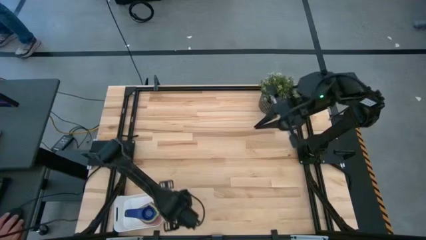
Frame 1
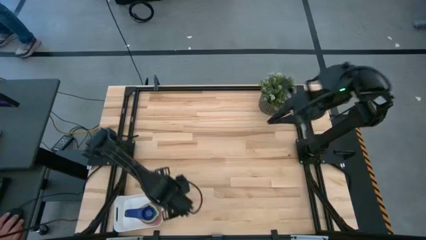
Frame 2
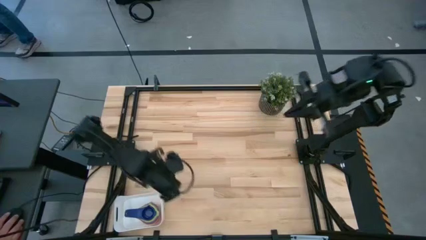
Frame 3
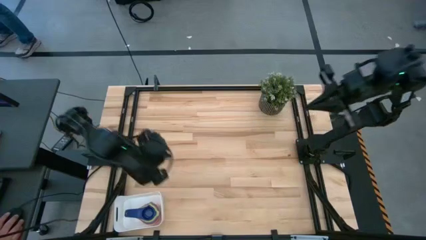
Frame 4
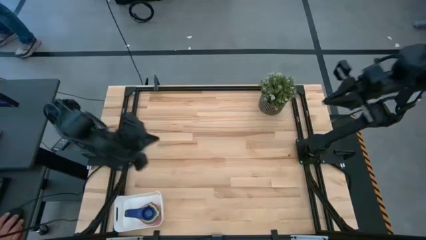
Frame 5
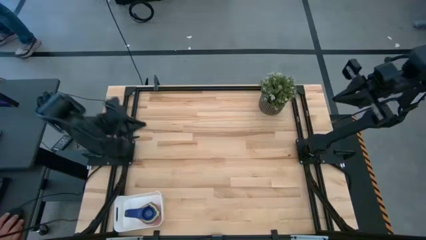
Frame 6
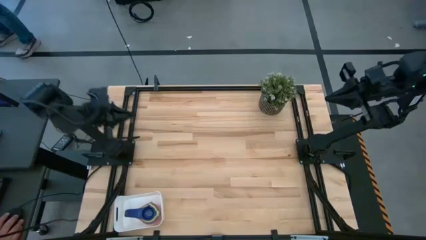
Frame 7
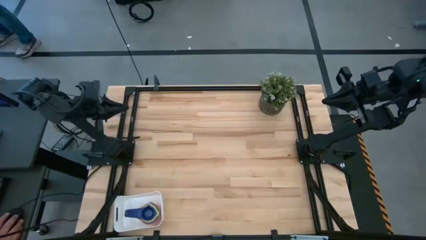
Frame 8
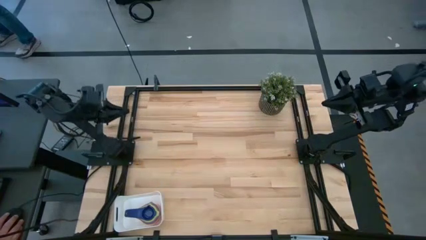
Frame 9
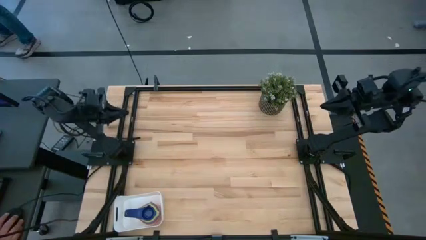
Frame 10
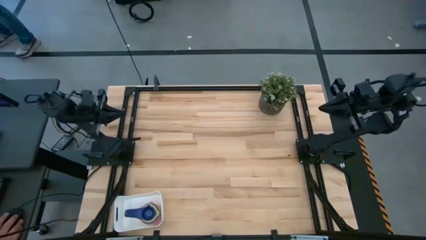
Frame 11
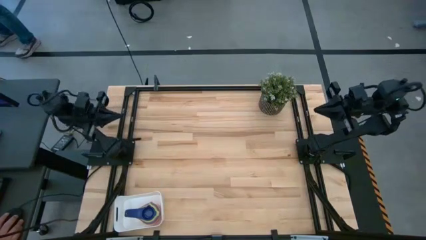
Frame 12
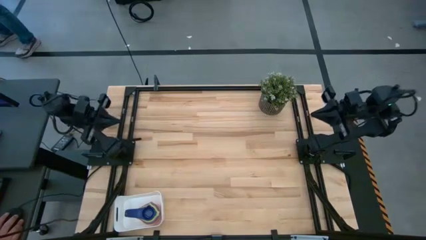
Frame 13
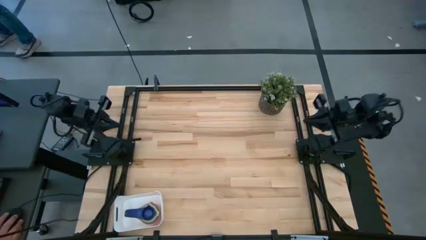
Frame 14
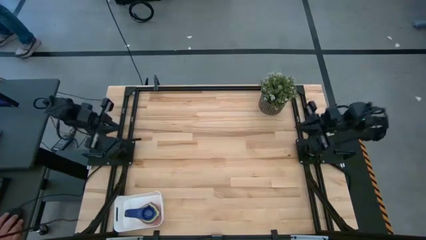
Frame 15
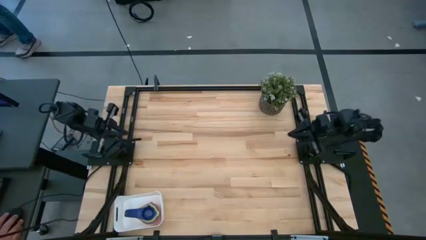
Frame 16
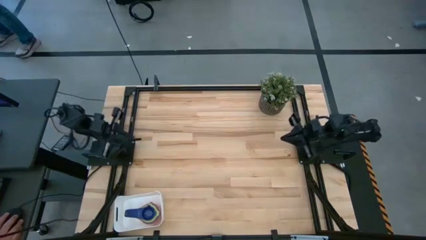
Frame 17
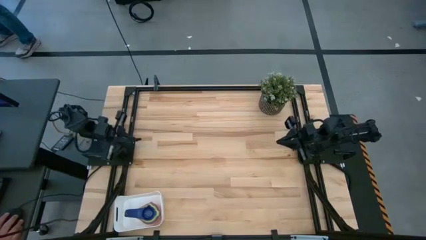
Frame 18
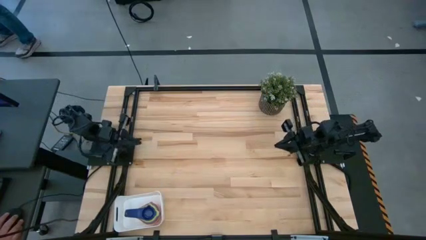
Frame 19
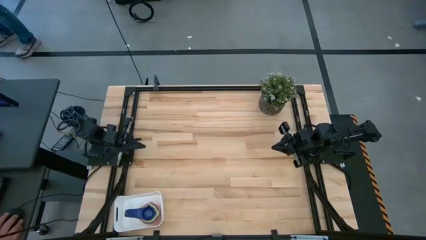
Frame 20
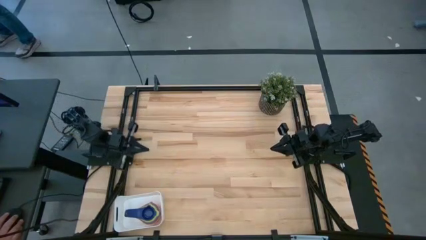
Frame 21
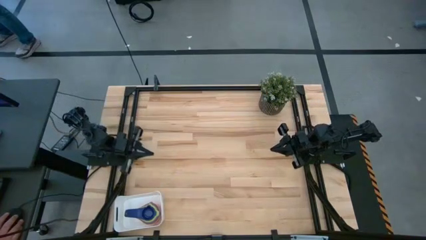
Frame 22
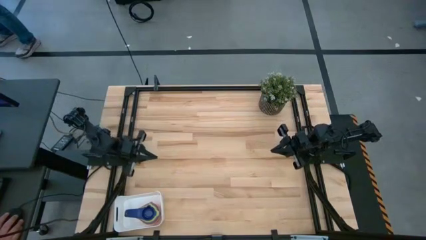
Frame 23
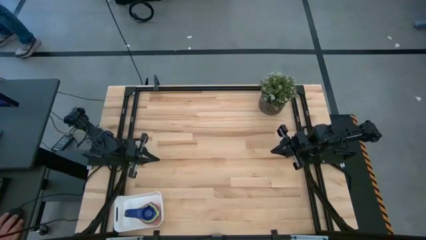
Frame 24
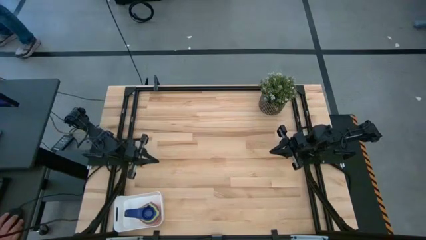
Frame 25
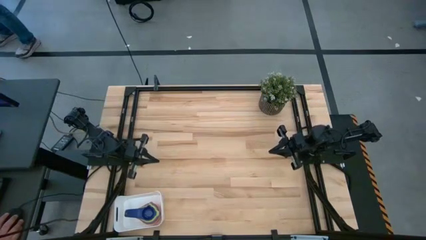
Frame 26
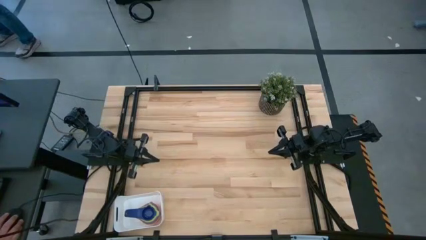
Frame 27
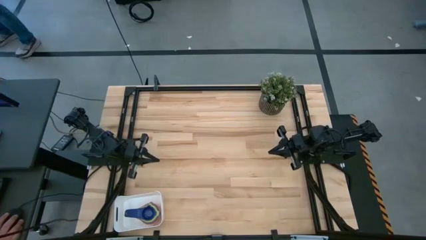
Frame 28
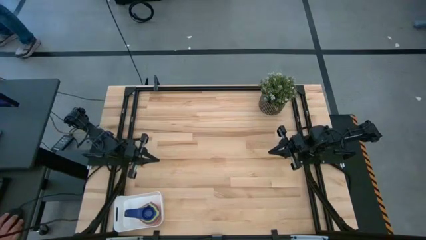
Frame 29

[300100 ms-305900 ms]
Task: Nest measuring cups in basket
Return to Home Position

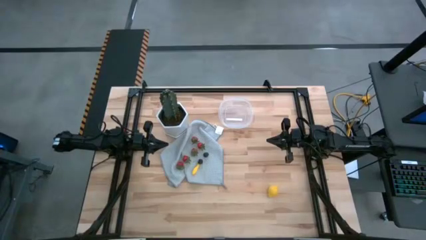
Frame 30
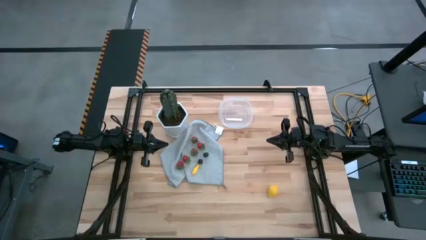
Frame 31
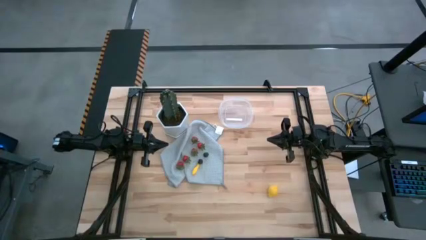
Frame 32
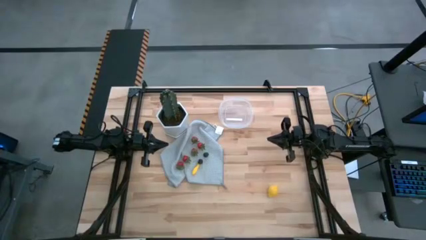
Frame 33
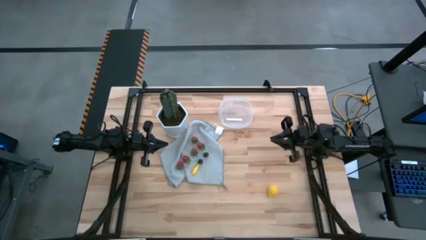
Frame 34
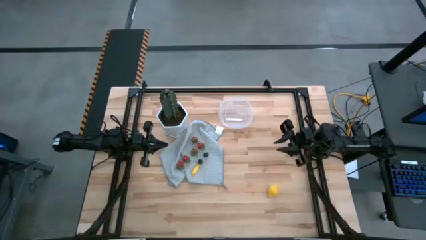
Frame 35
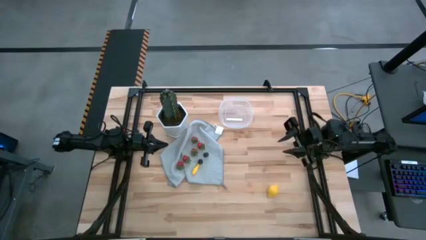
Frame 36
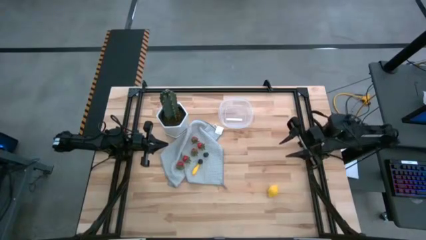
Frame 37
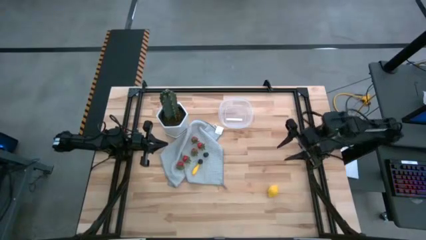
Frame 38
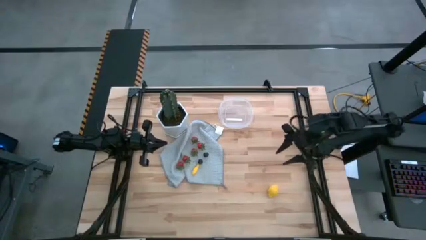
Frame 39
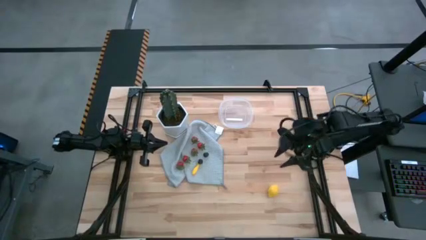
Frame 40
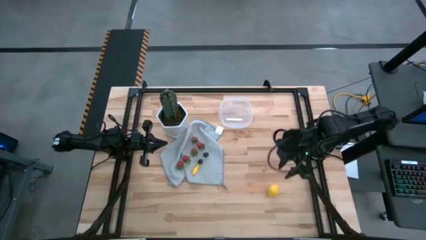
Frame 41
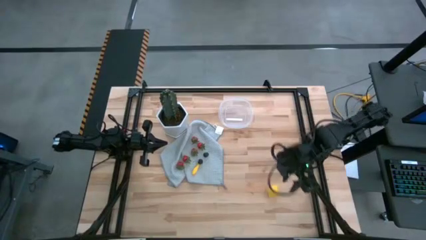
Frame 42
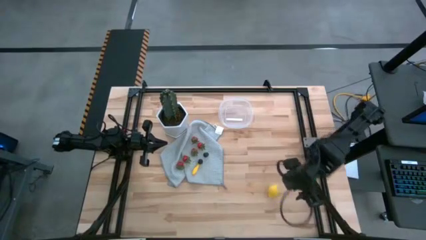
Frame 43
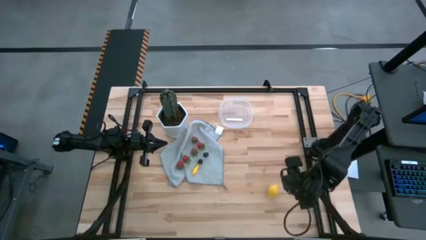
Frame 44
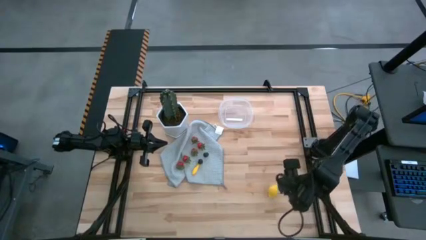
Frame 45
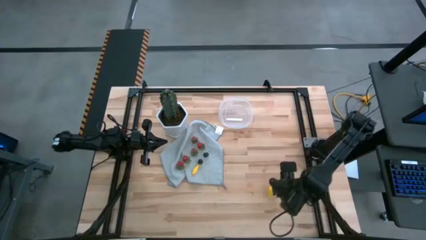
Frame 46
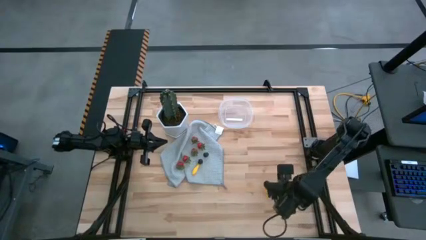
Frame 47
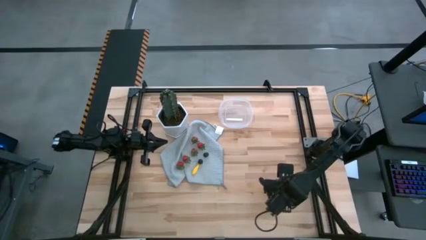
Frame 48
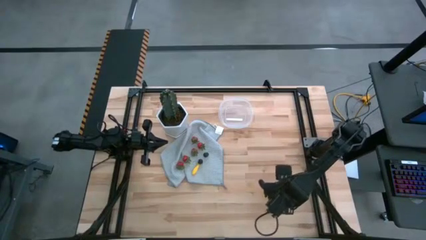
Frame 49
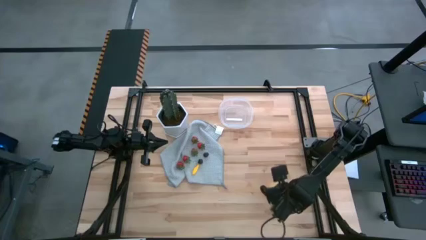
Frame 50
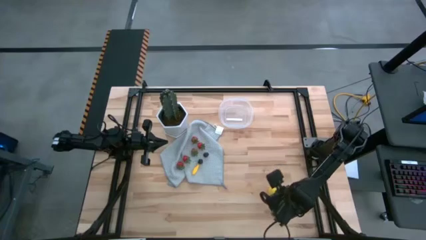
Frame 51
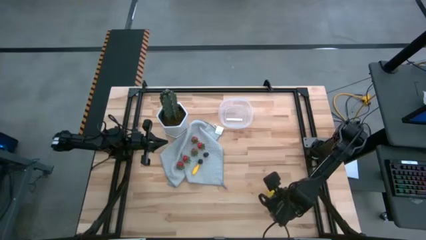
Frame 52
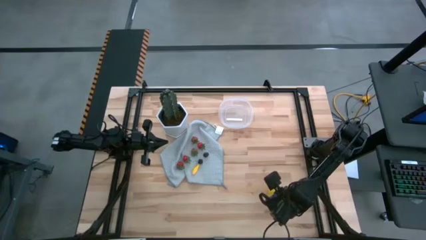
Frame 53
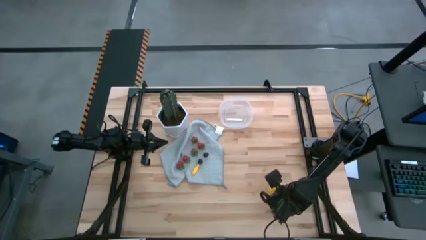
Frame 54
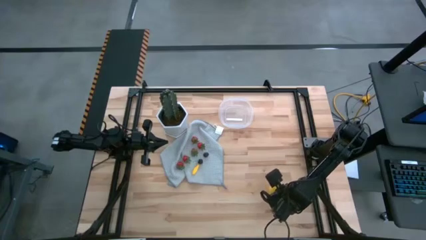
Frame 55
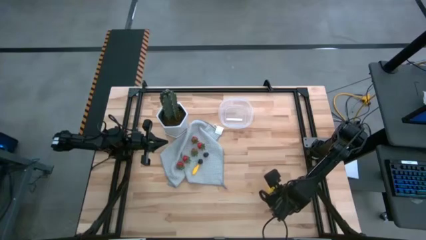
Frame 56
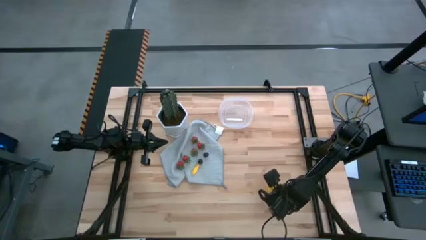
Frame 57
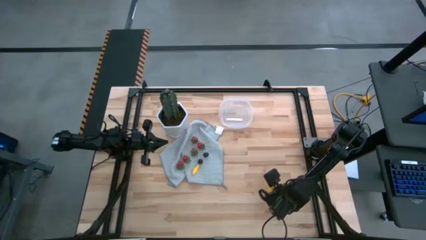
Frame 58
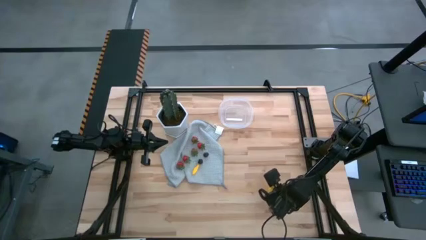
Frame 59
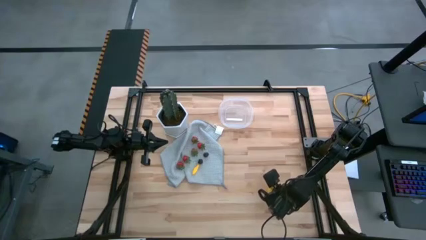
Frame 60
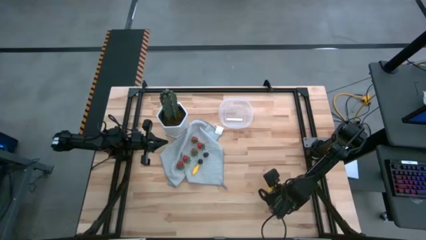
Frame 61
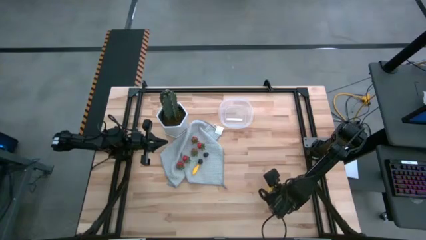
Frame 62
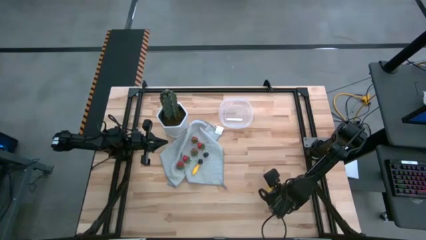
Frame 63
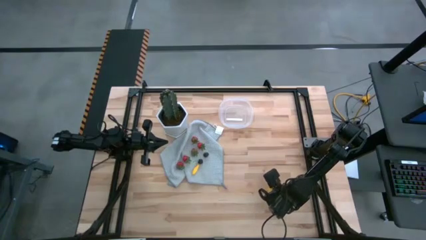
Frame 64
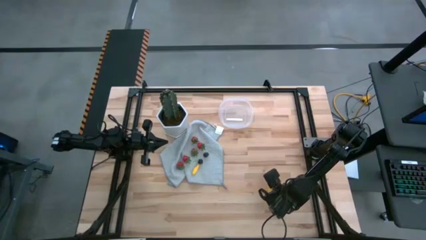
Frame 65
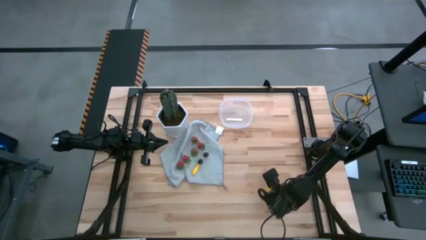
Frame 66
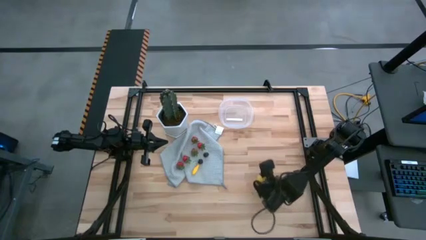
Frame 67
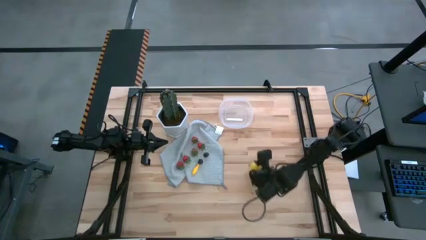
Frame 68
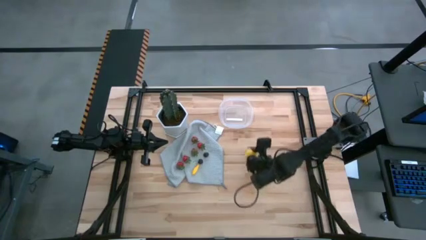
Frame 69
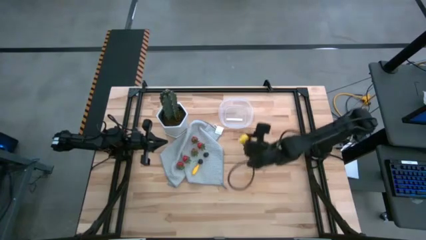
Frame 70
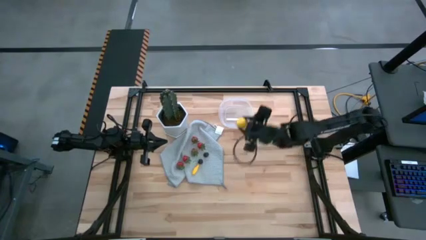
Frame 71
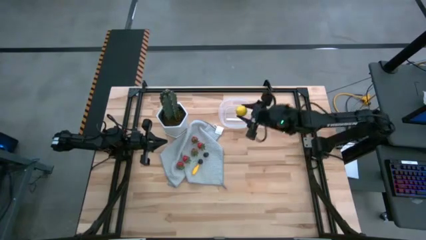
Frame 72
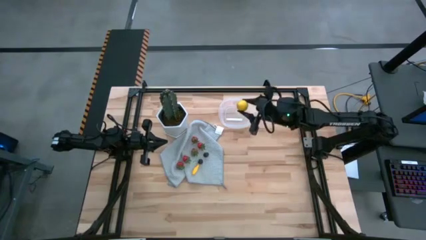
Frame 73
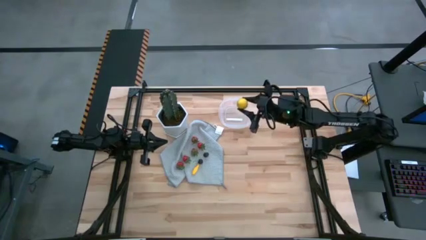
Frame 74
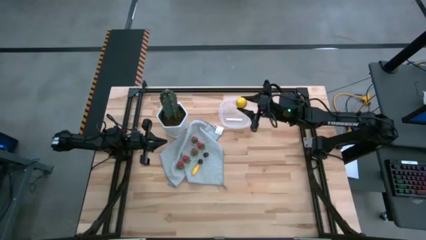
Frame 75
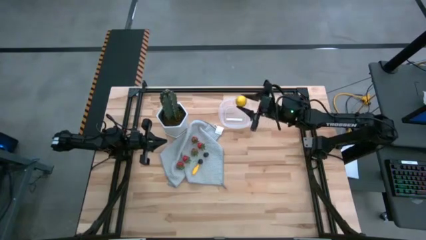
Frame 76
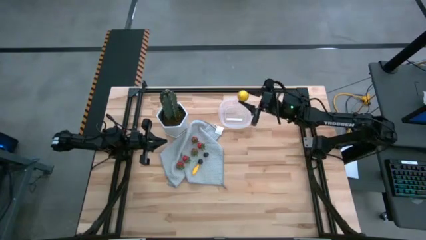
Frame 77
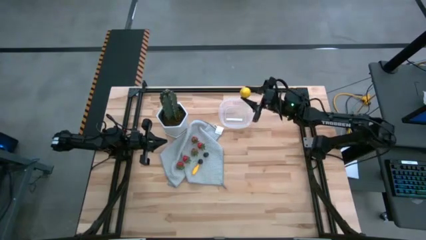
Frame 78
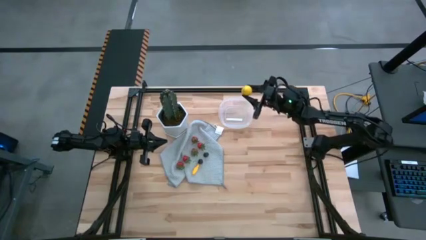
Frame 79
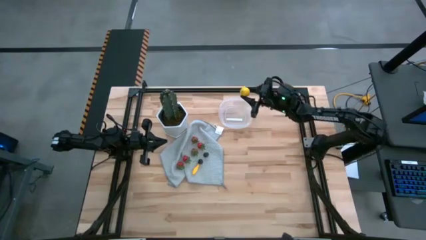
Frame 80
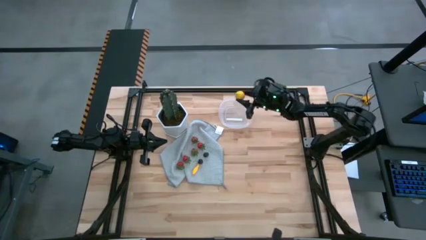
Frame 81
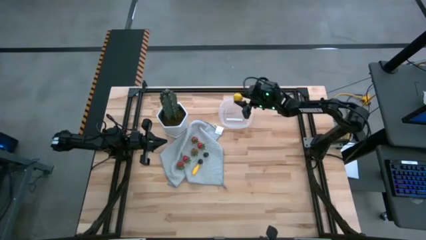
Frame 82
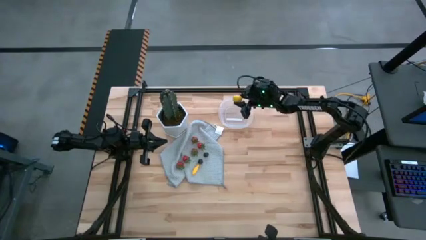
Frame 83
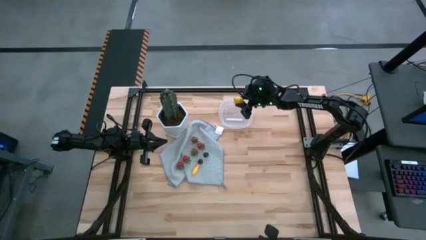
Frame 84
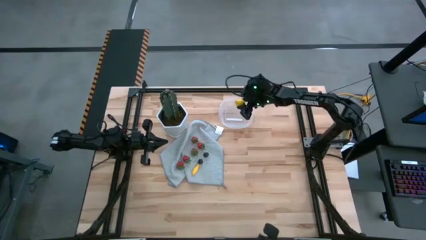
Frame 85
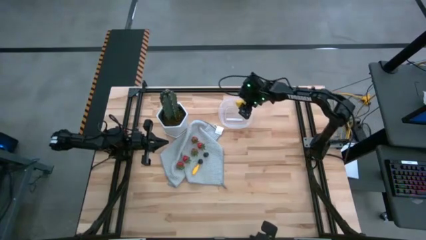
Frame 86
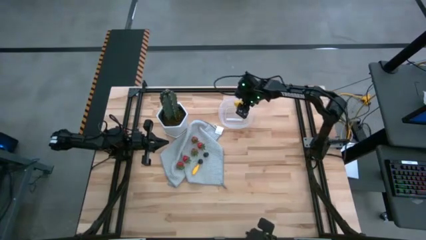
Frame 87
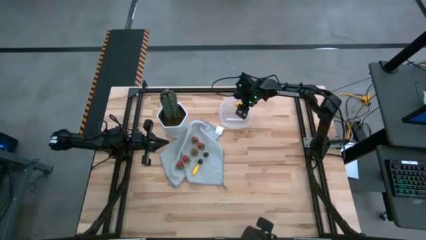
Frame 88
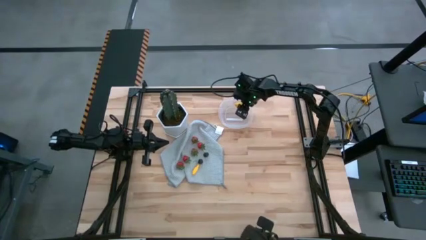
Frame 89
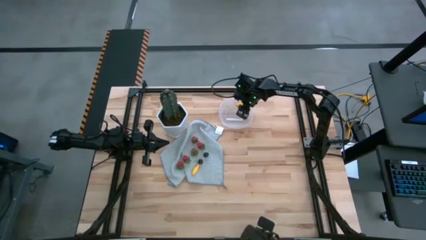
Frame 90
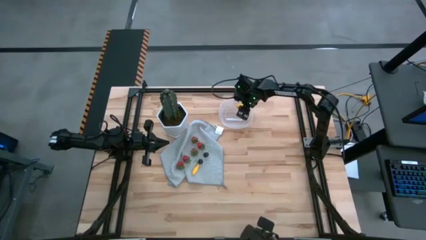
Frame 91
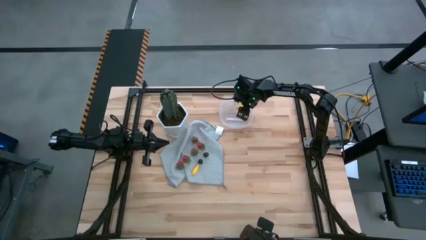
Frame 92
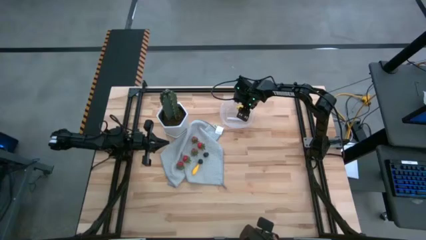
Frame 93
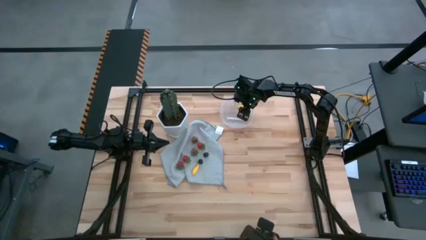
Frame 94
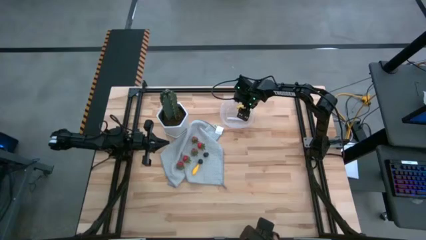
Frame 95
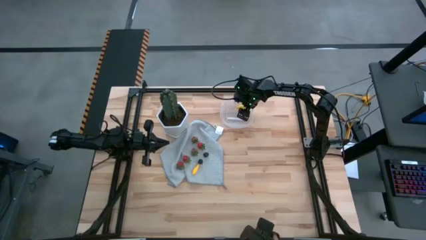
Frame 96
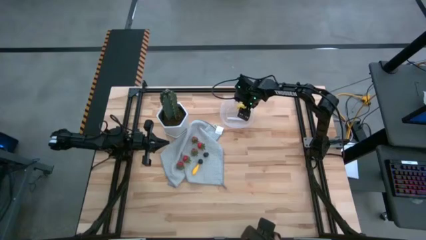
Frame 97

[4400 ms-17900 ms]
Task: Pick and placing Produce into tupperware
Put the yellow lemon into the transparent bin
